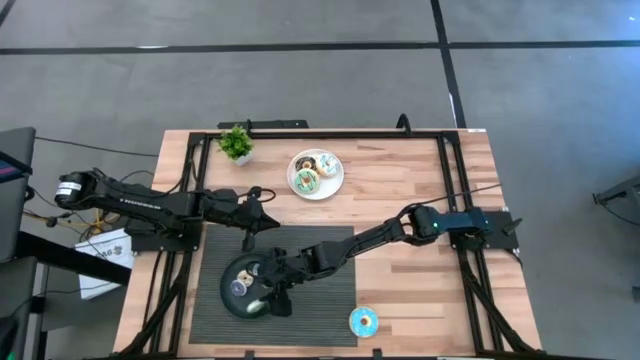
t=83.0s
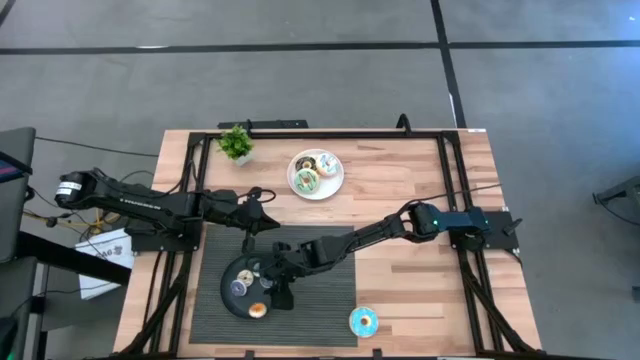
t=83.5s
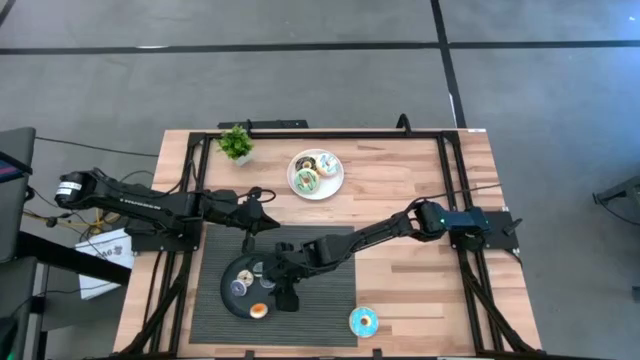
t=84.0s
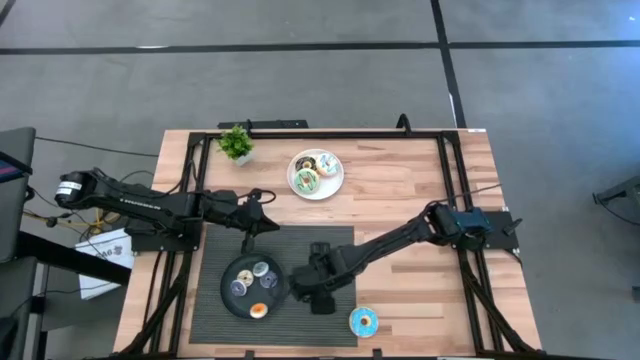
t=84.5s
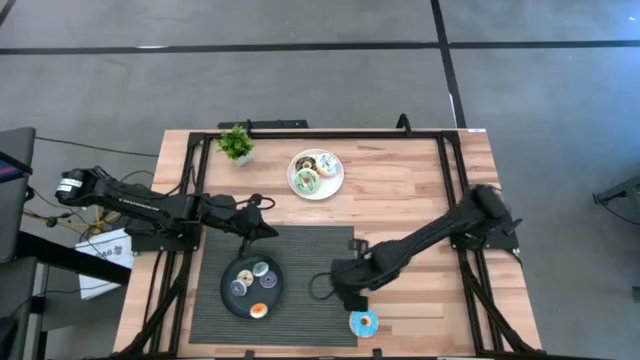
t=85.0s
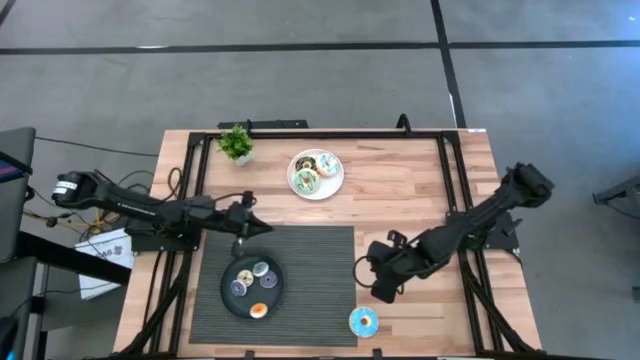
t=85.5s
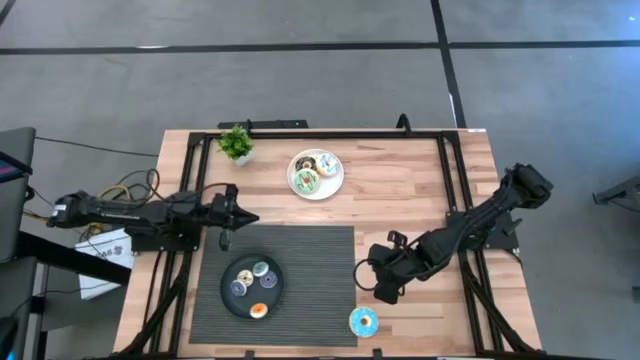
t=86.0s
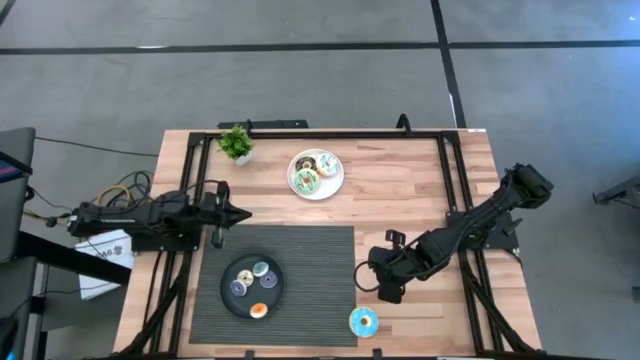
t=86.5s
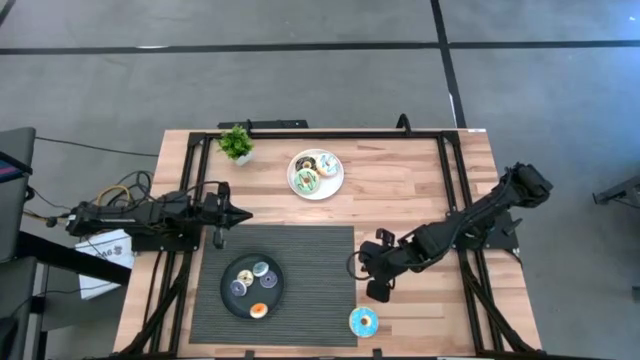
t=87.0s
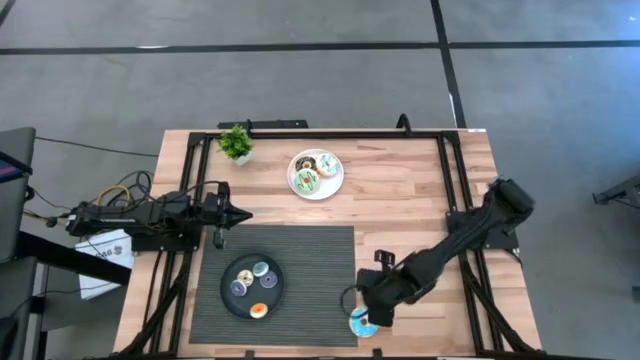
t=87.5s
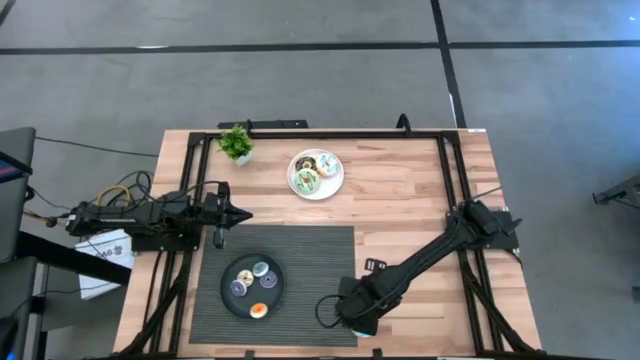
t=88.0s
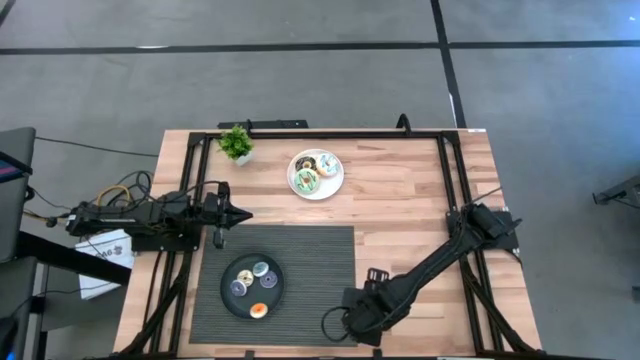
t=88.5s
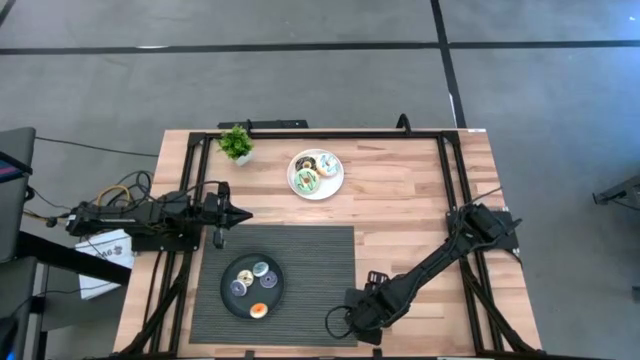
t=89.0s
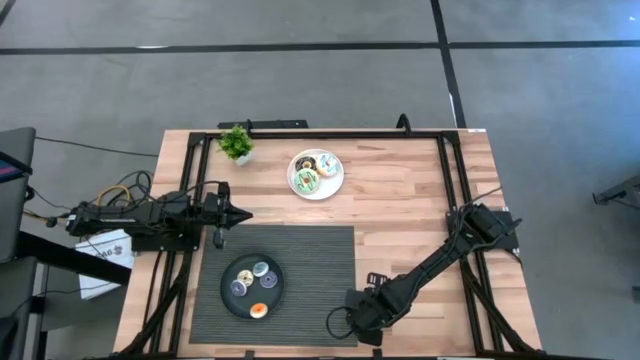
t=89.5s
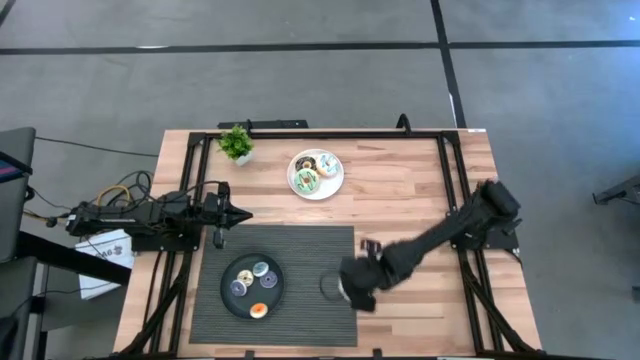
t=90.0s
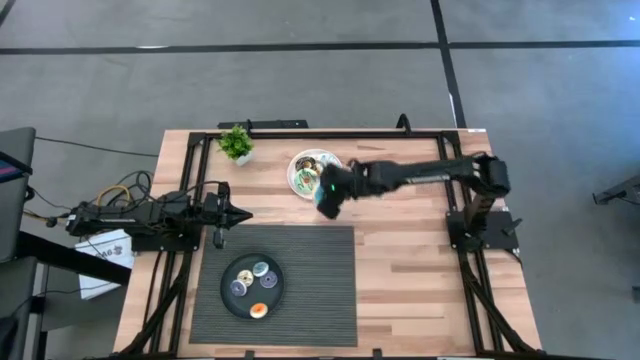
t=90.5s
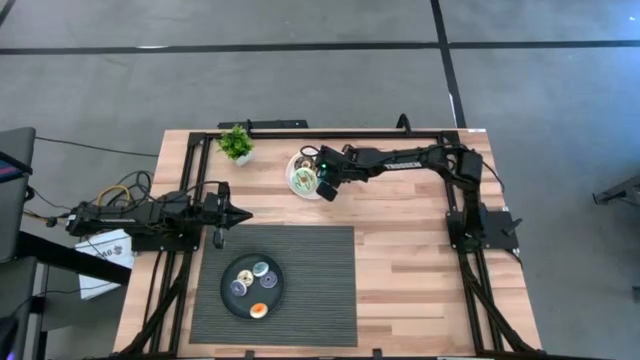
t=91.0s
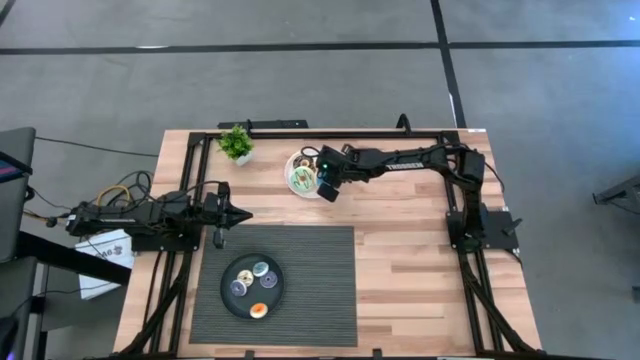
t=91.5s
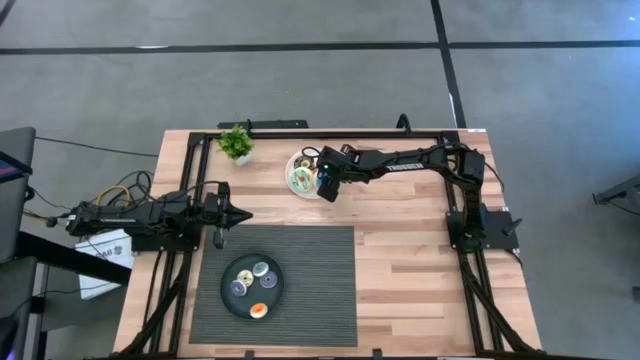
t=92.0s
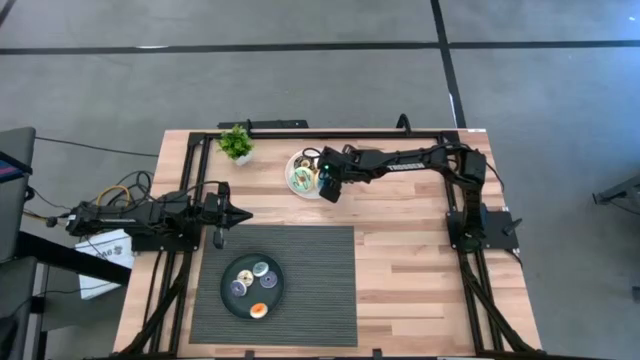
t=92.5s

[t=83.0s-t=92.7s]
Task: Pick & Place donuts
Put the large blue donut on the white plate

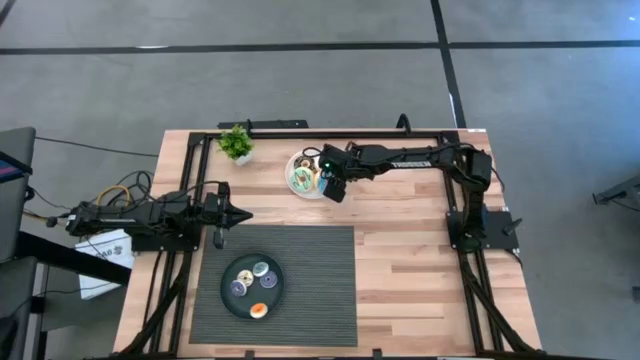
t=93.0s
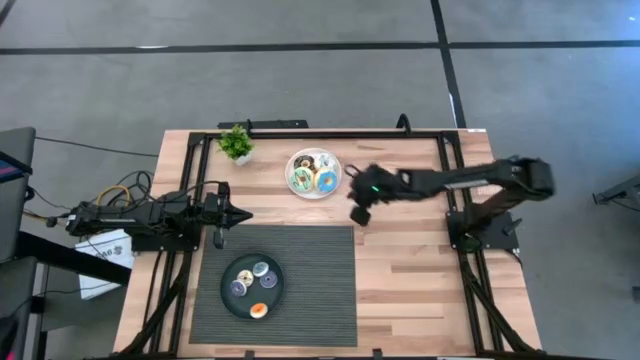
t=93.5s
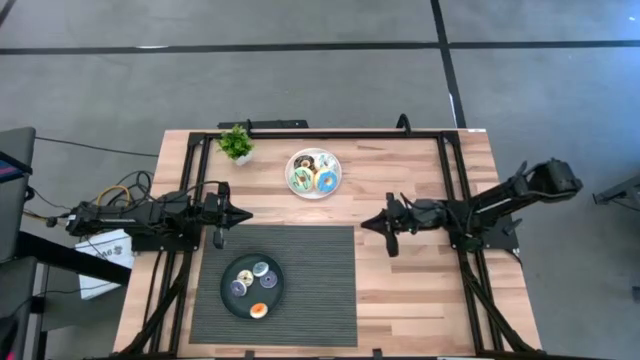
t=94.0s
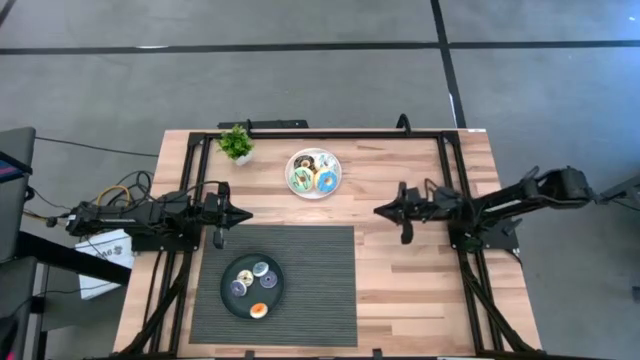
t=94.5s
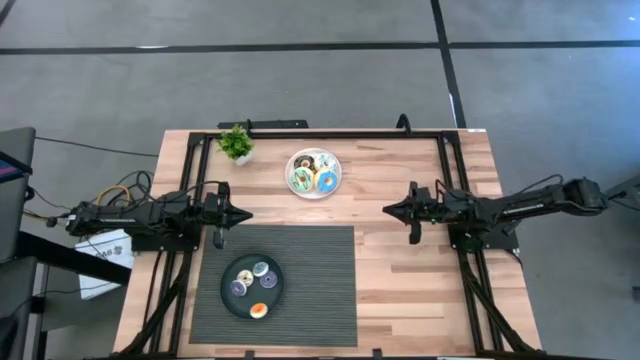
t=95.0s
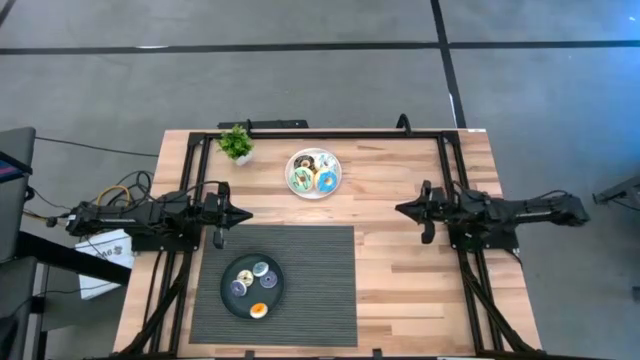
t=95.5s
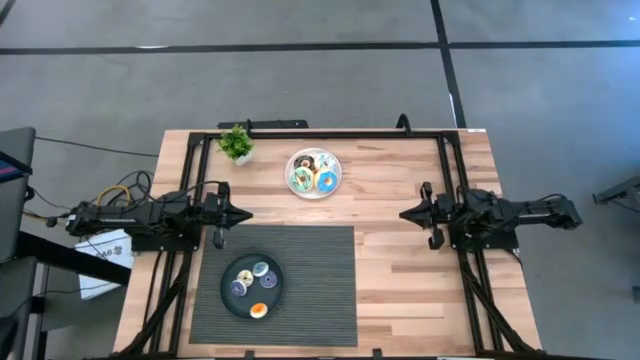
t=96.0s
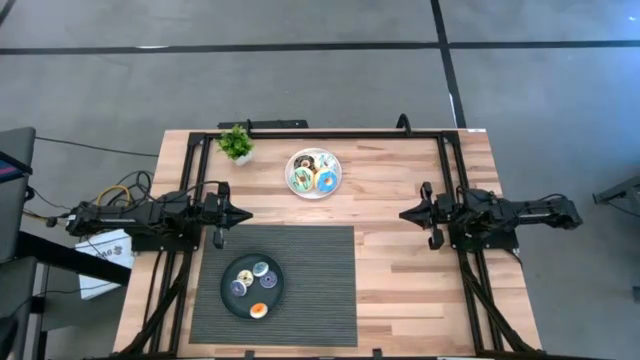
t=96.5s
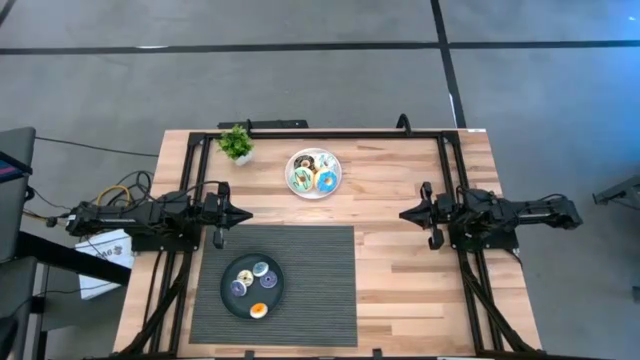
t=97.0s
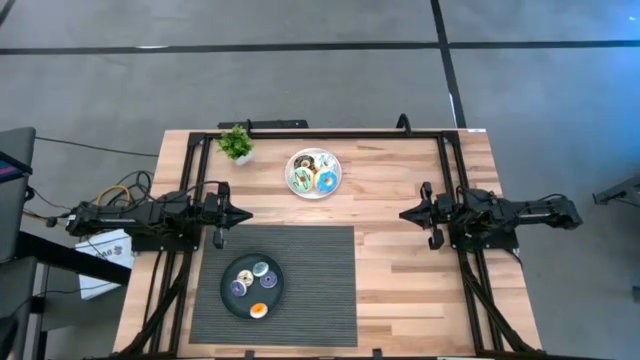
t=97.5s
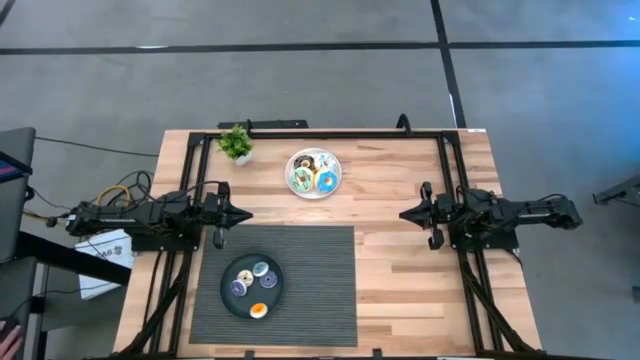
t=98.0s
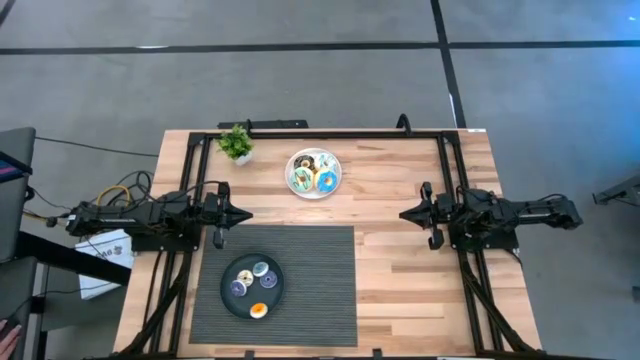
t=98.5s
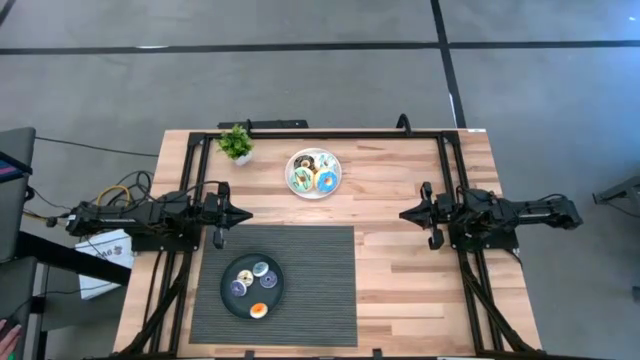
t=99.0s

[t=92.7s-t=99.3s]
Return to Home Position

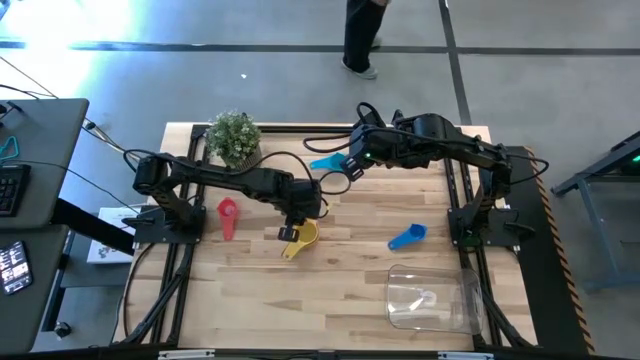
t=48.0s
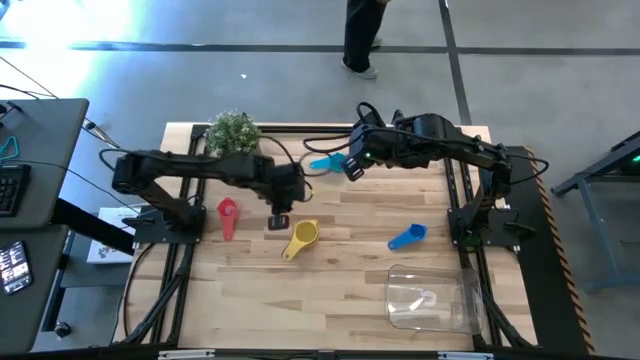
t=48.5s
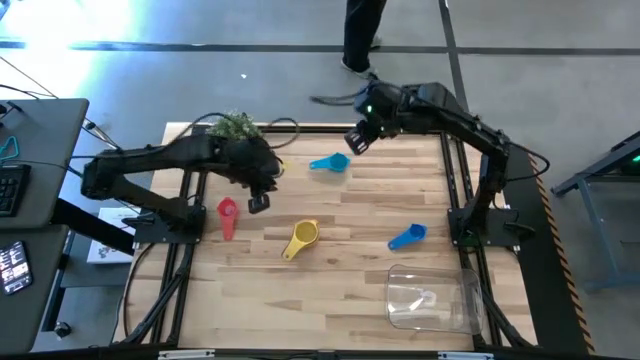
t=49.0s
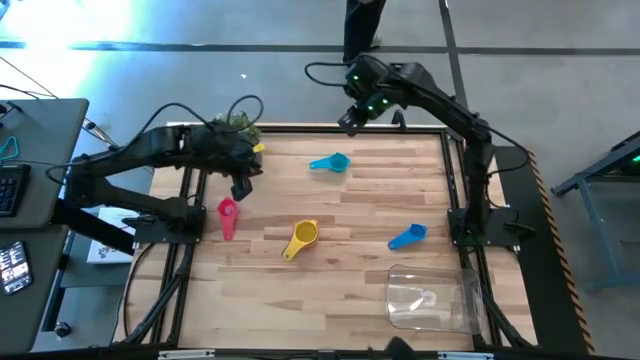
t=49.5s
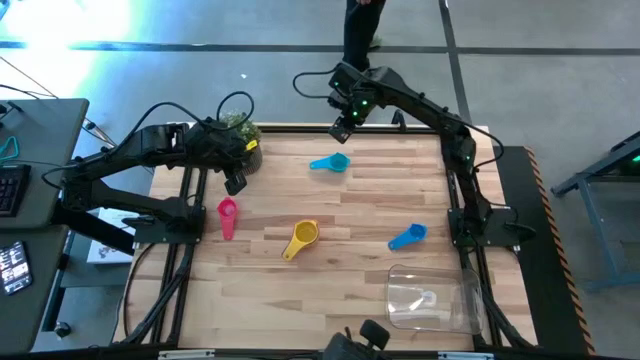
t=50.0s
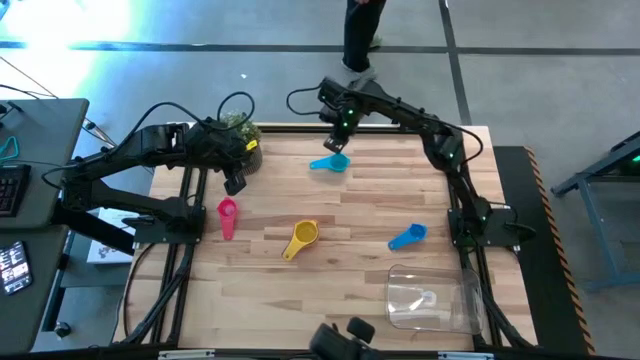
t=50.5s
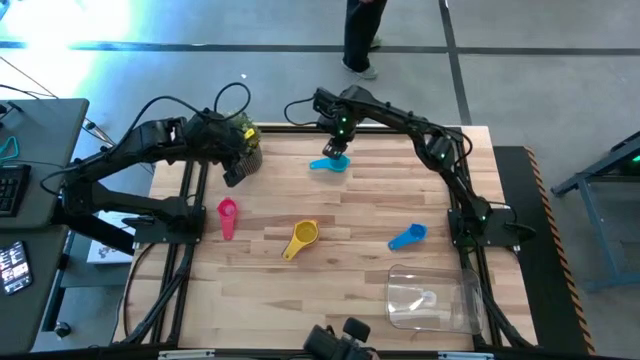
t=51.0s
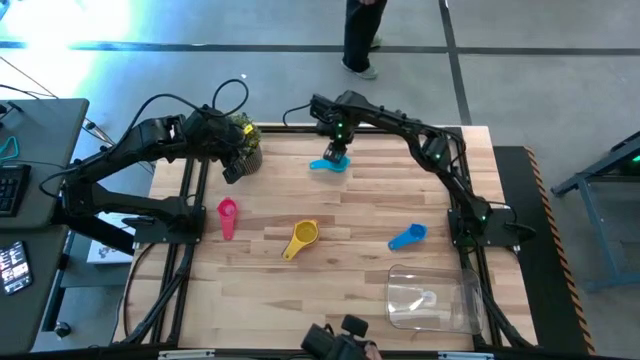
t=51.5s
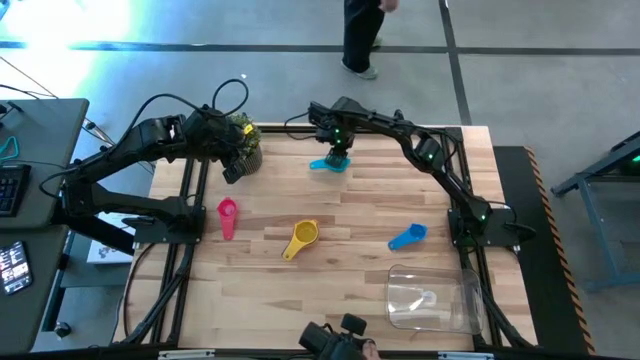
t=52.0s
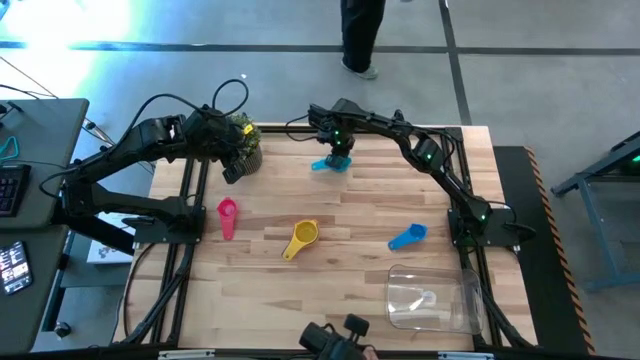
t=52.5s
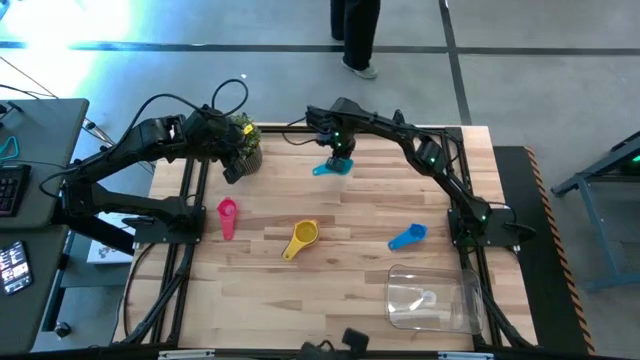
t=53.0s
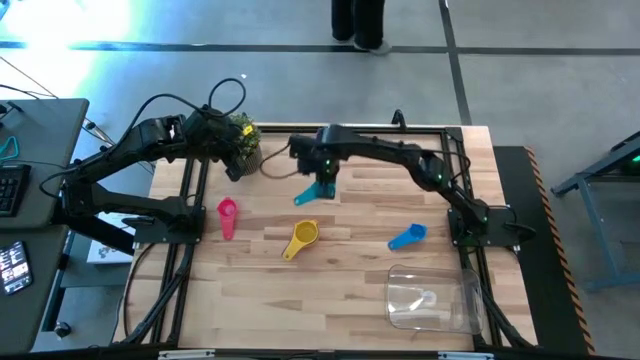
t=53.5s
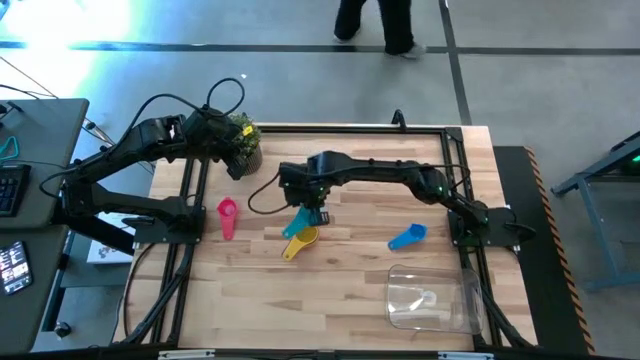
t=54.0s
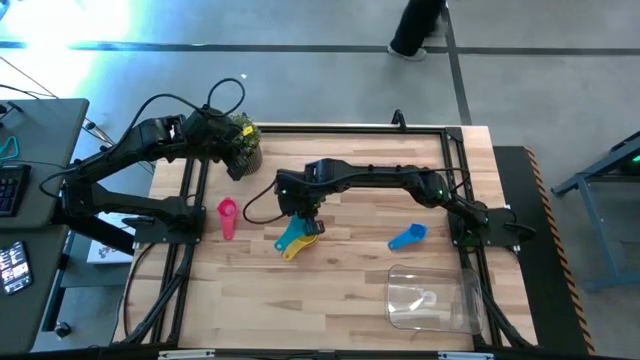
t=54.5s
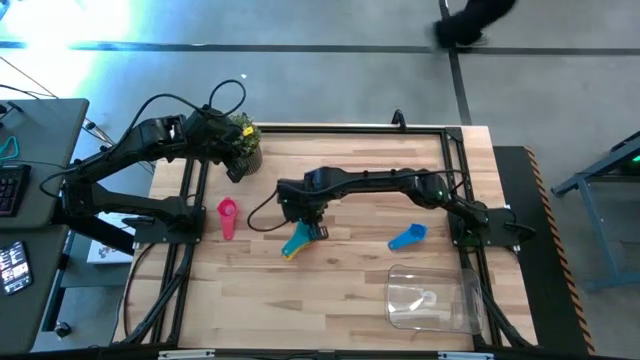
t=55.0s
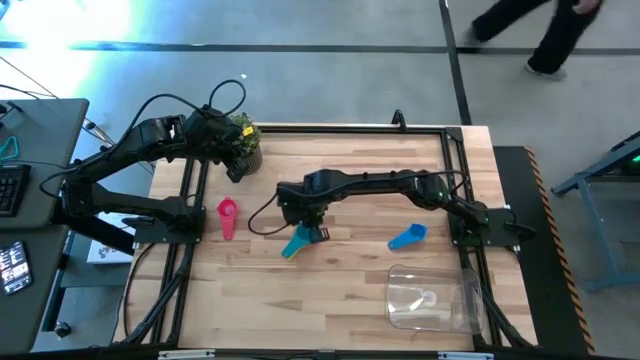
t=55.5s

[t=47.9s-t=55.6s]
Task: Nest measuring cups in basket
Stack the light blue measuring cup on top of the yellow measuring cup
